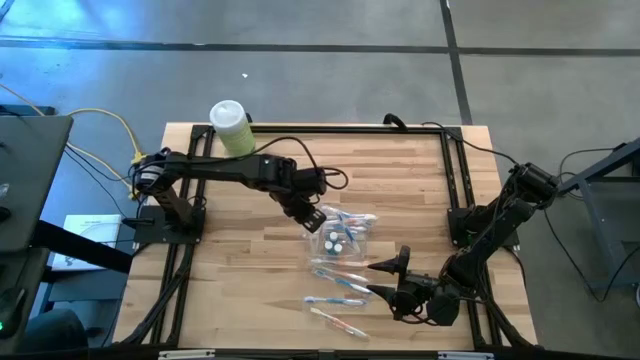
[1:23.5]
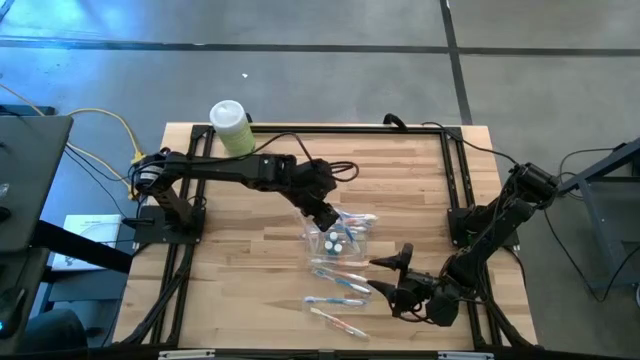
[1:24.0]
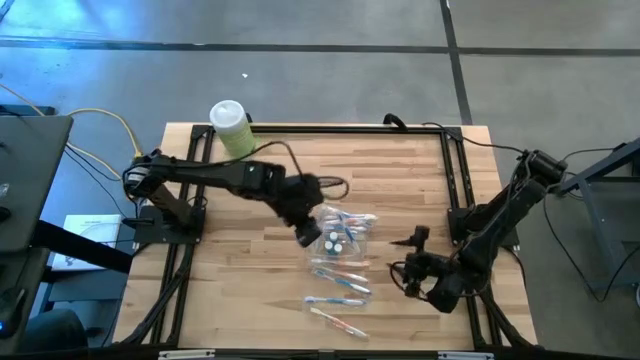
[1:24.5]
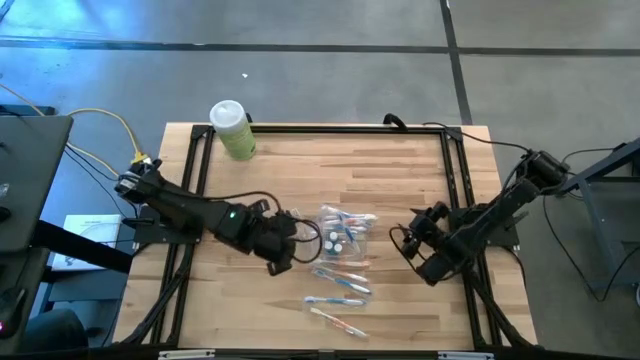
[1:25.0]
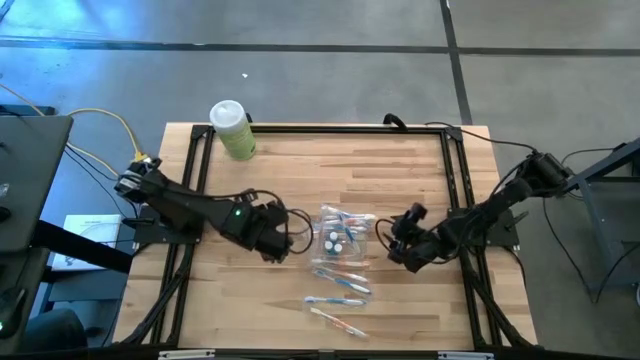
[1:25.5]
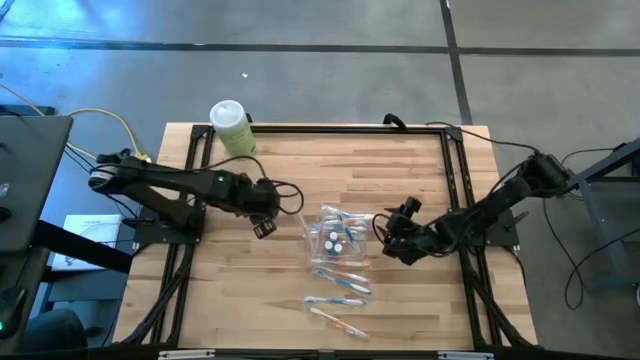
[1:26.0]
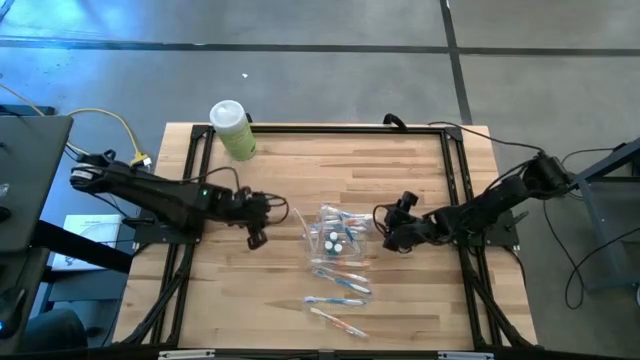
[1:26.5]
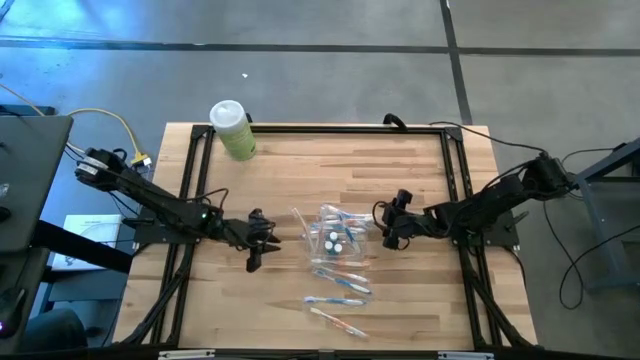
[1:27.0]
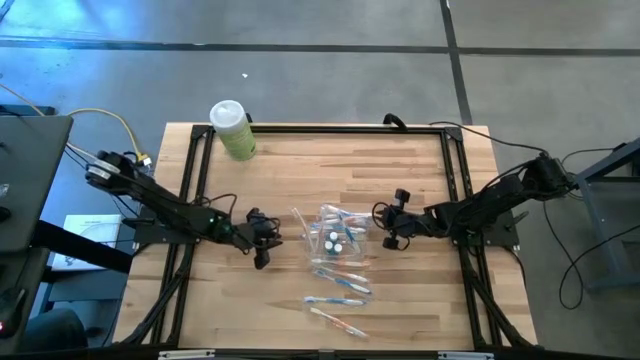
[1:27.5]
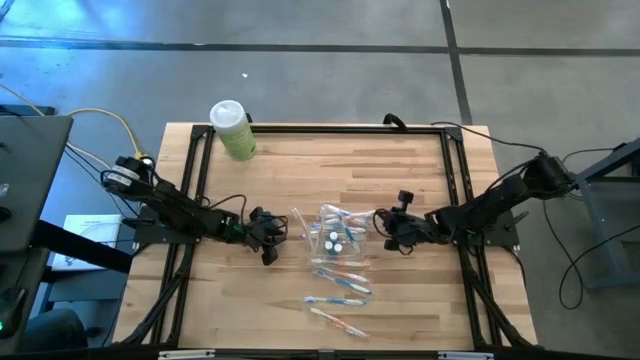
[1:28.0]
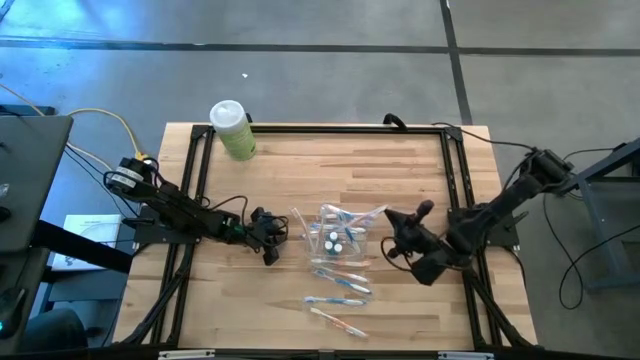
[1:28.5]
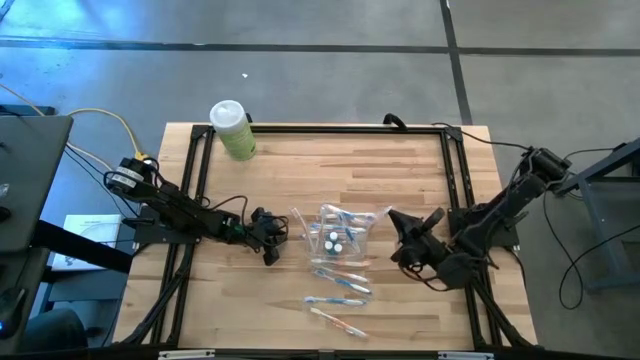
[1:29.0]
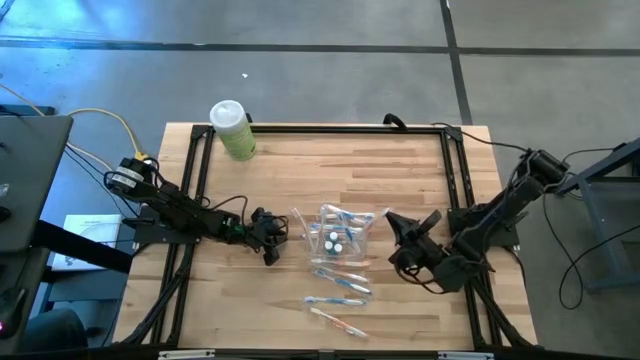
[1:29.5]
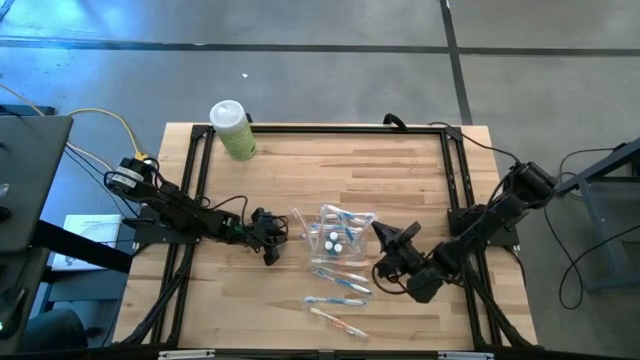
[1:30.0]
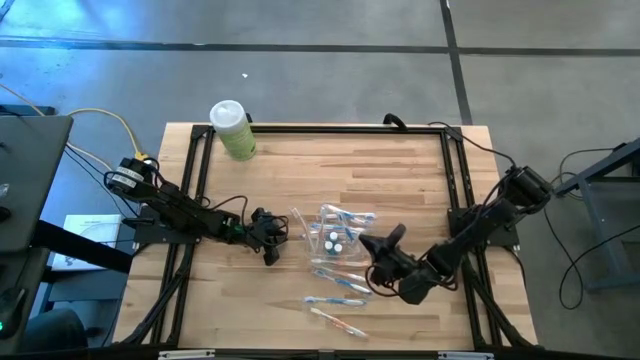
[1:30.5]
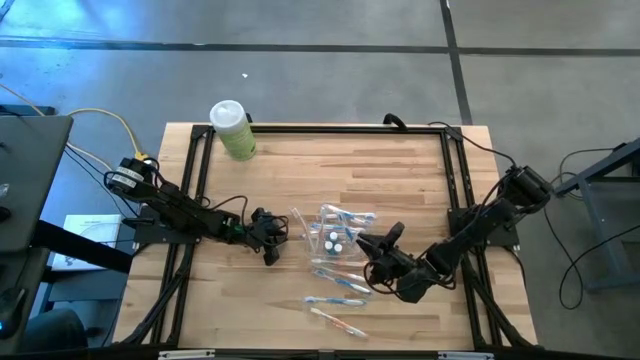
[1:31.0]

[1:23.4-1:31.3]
Task: Pick & Place toothbrushing station
Put the orange toothbrush into the transparent organizer

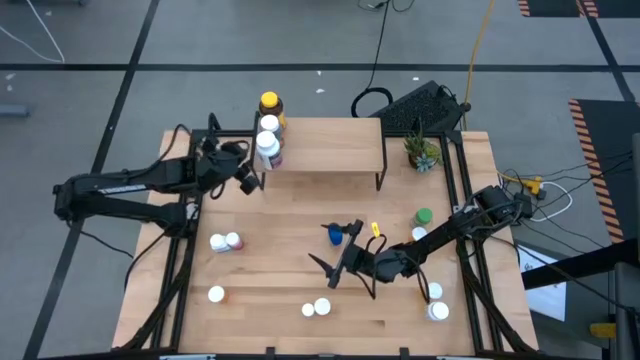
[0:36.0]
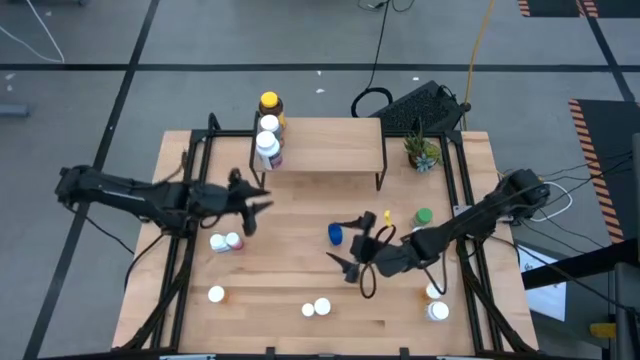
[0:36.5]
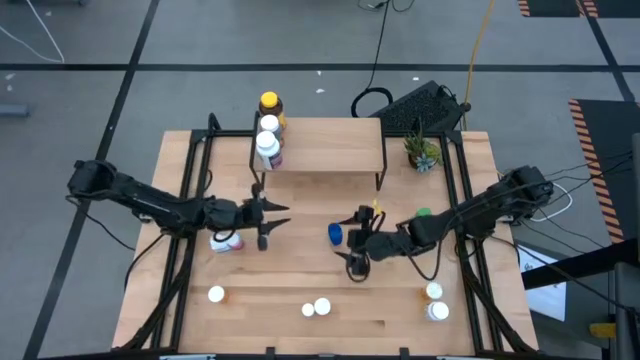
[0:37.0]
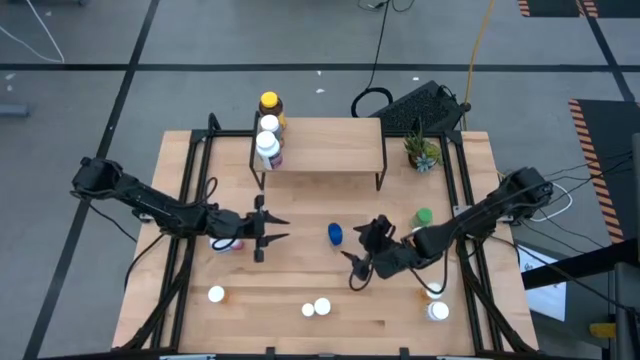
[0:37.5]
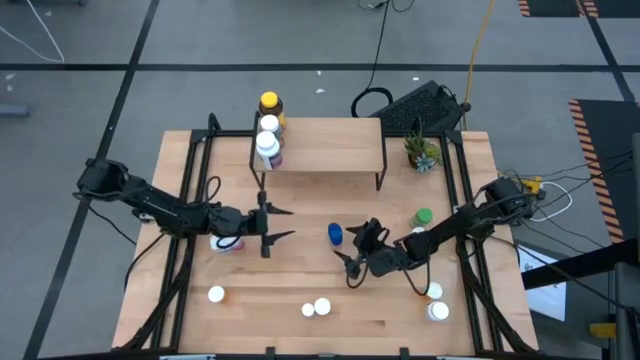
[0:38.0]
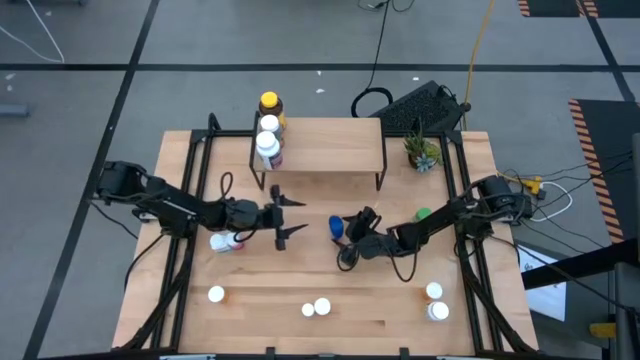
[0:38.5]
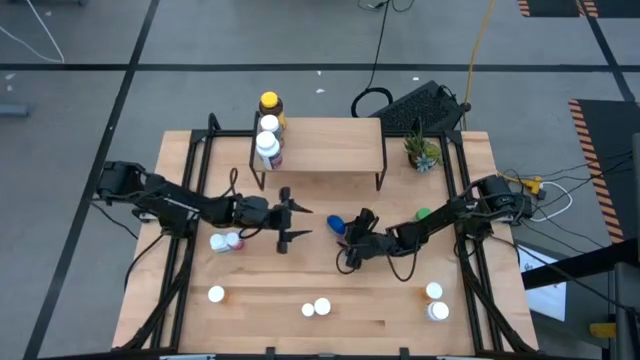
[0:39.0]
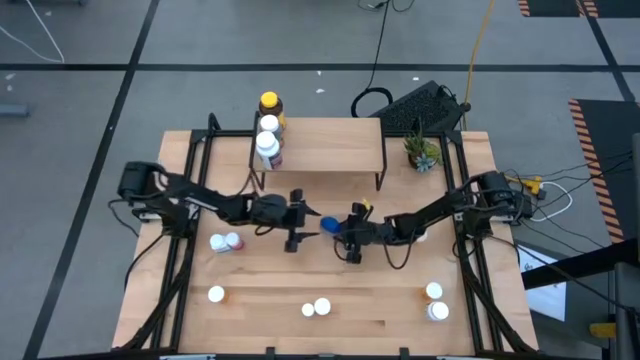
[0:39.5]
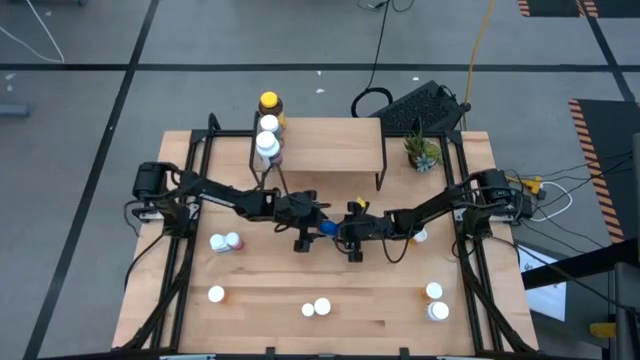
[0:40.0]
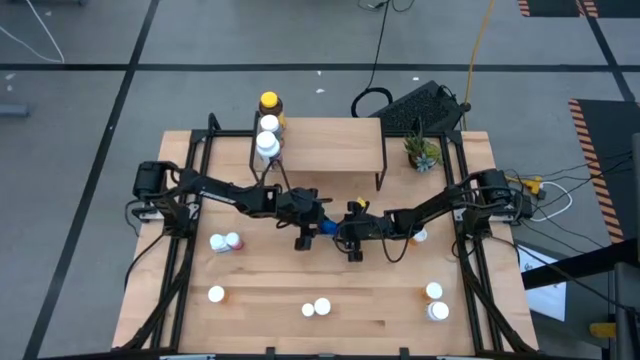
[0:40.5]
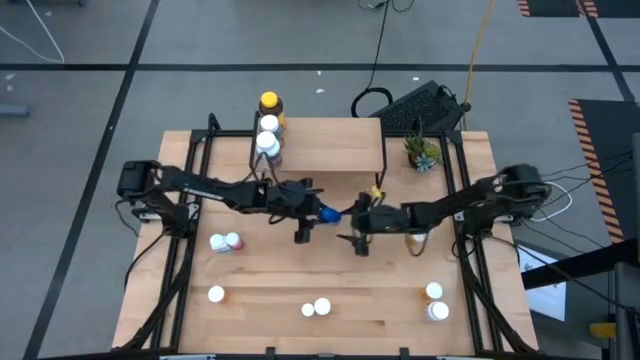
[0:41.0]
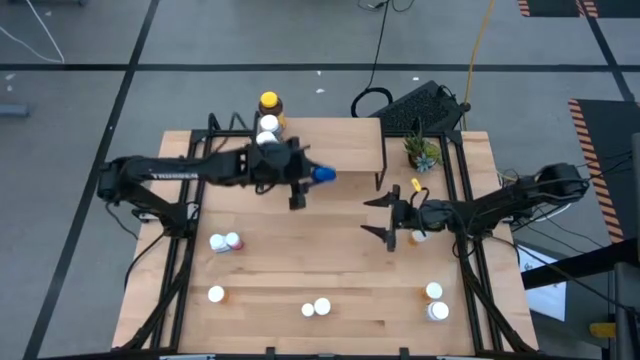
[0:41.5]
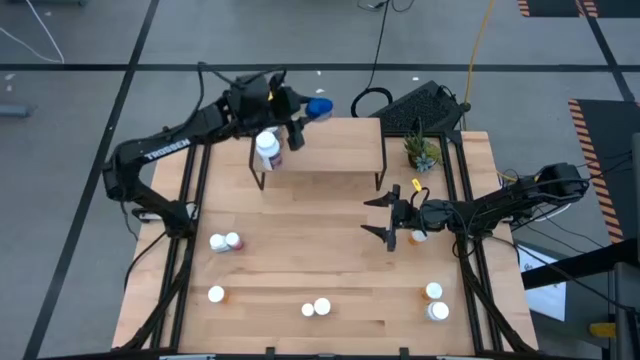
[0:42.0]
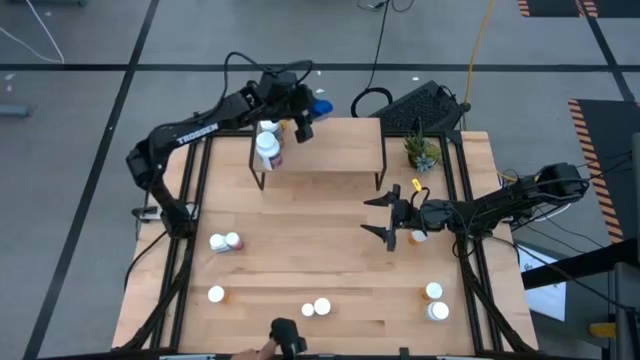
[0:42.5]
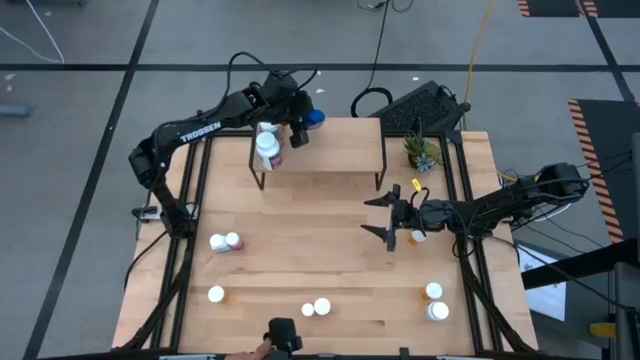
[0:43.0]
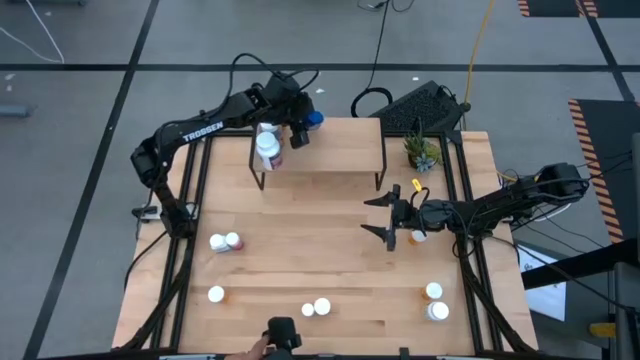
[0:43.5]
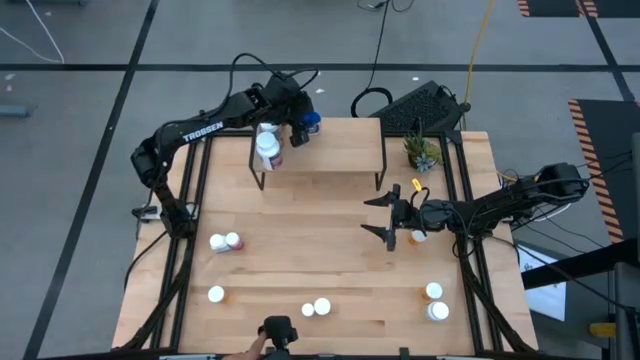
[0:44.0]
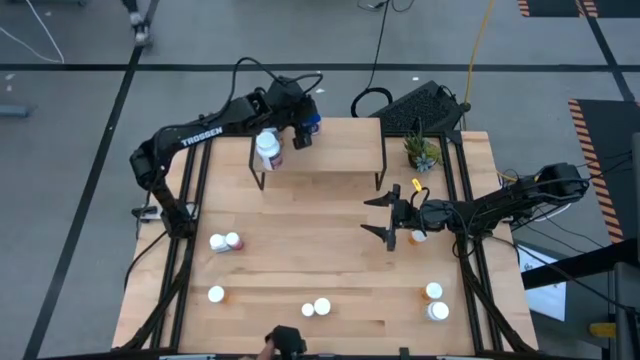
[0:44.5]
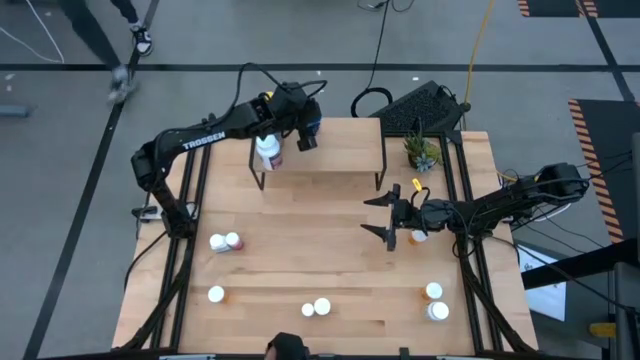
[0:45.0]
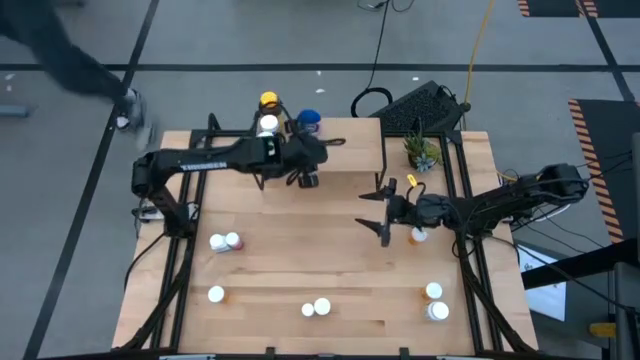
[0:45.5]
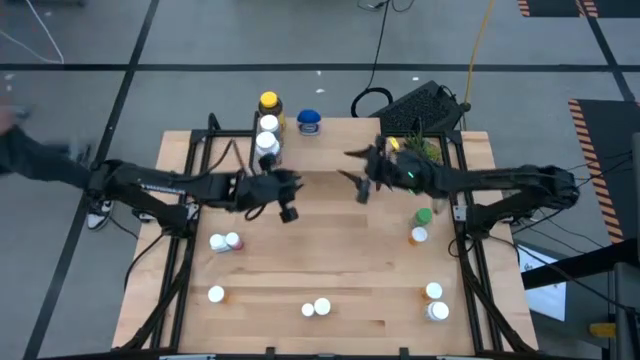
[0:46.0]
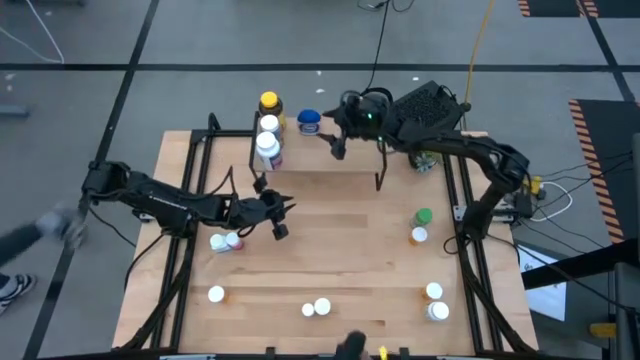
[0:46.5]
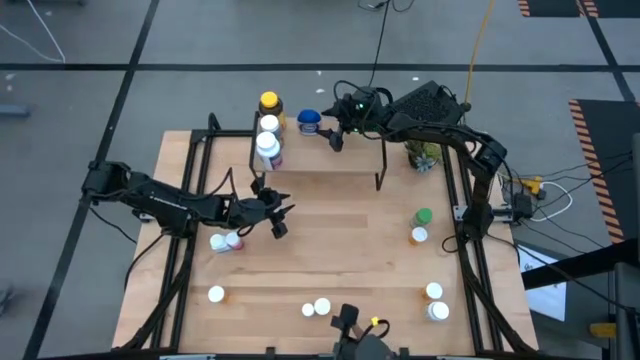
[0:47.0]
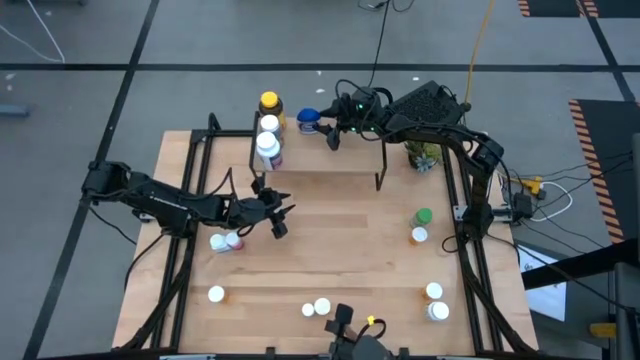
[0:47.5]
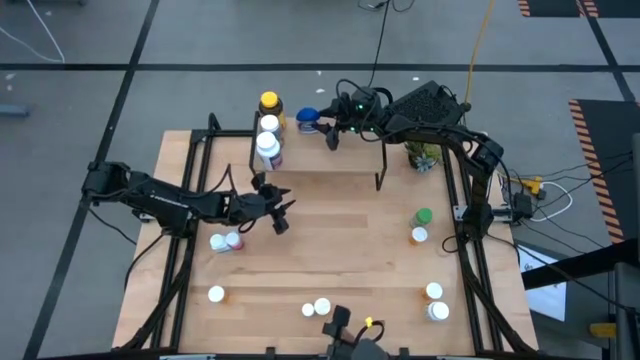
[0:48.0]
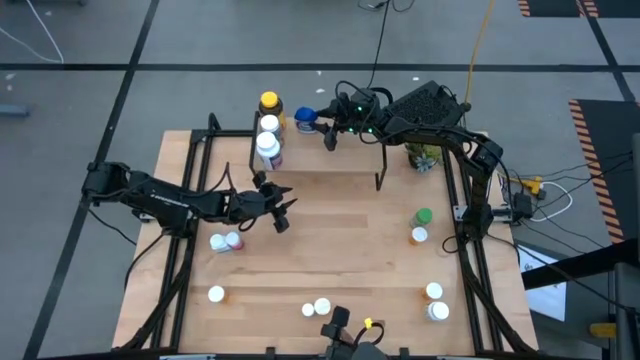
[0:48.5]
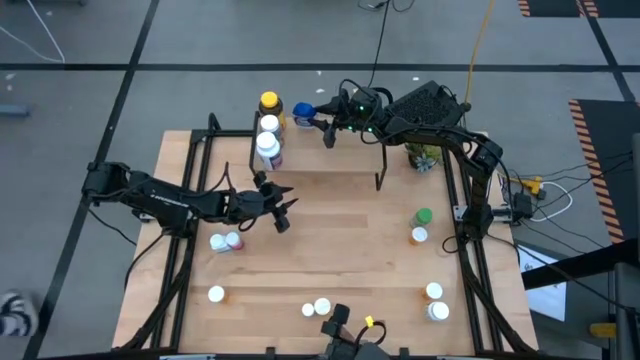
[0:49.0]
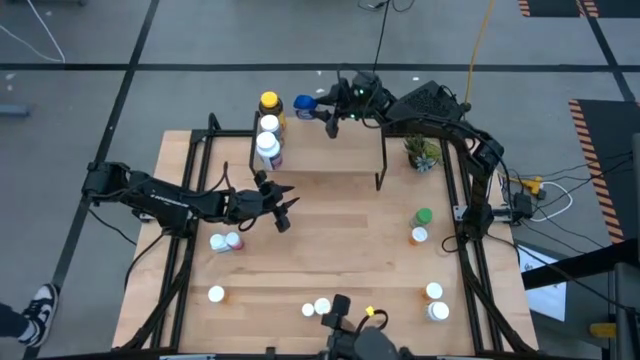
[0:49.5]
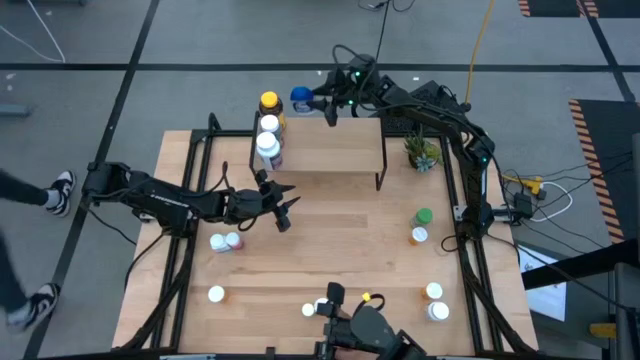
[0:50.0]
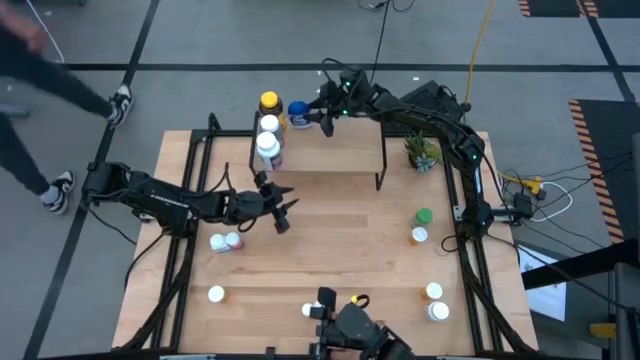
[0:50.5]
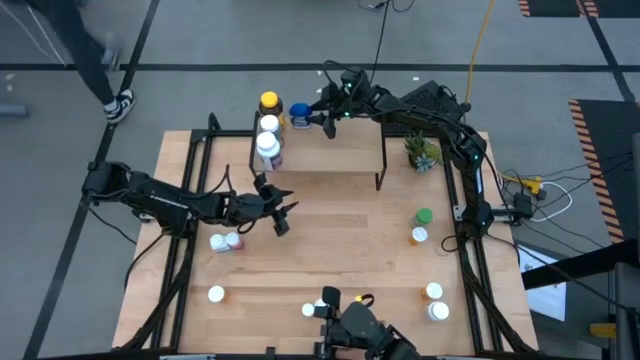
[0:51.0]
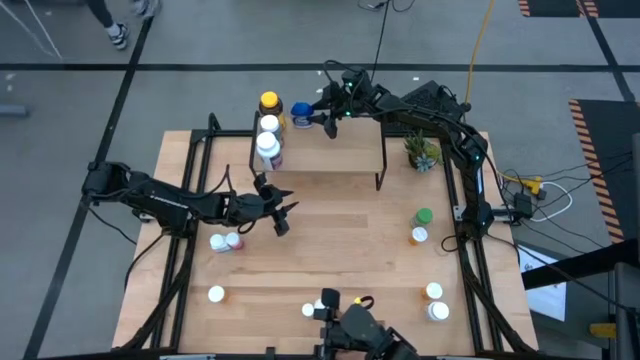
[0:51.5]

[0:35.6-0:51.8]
Task: Pick and place medicine bottles onto shelf by color
Put the blue medicine bottle on the shelf
